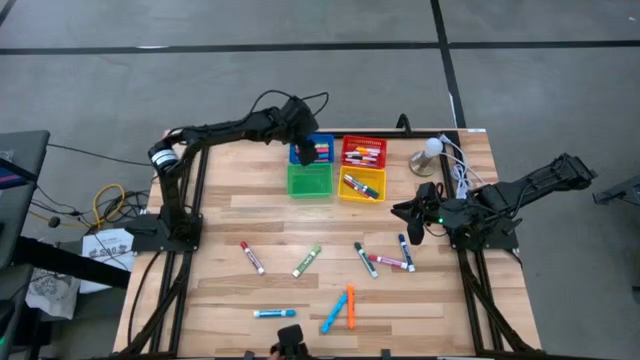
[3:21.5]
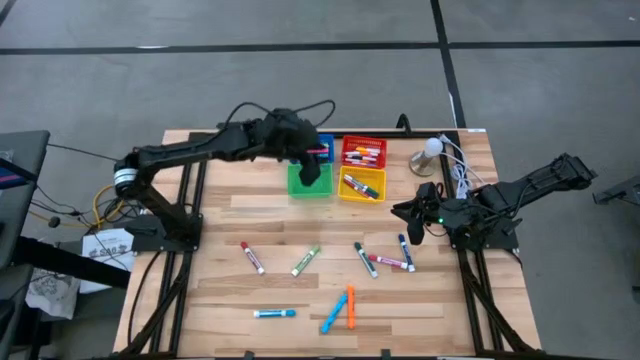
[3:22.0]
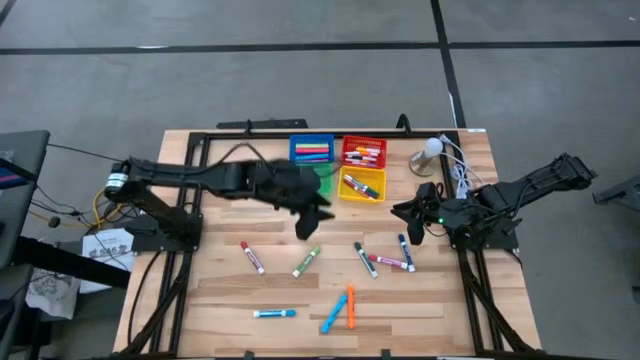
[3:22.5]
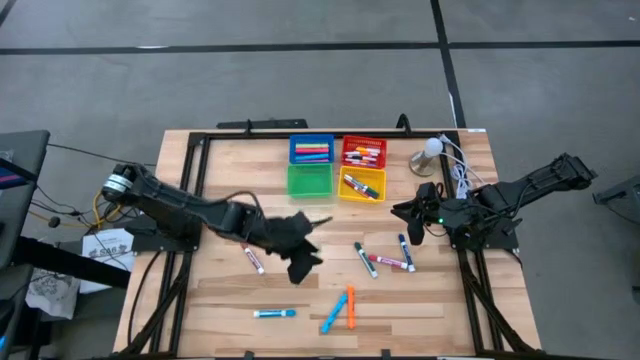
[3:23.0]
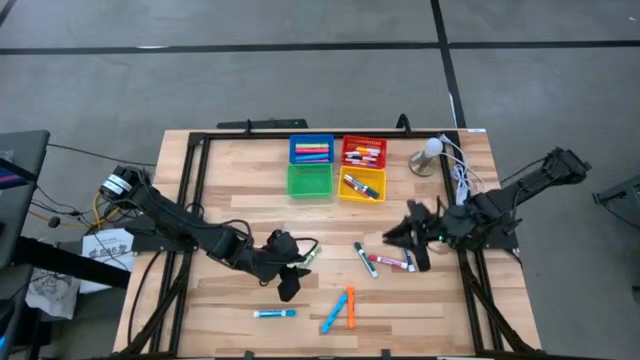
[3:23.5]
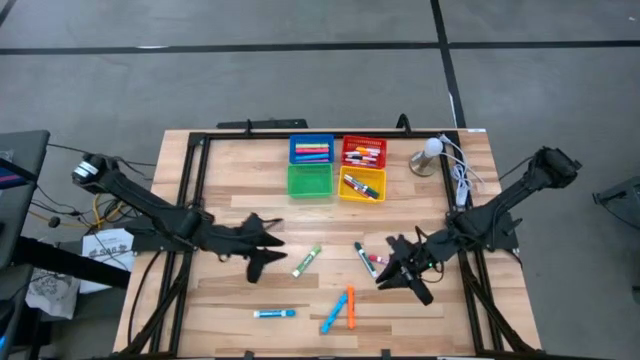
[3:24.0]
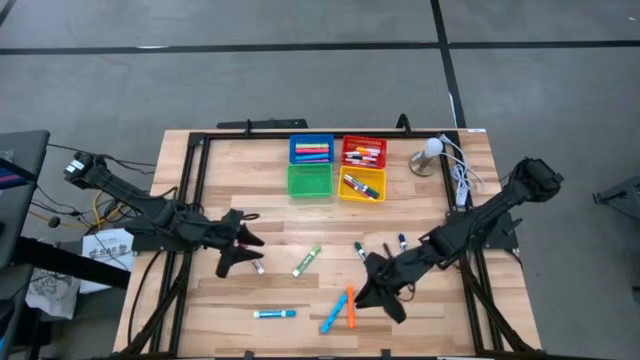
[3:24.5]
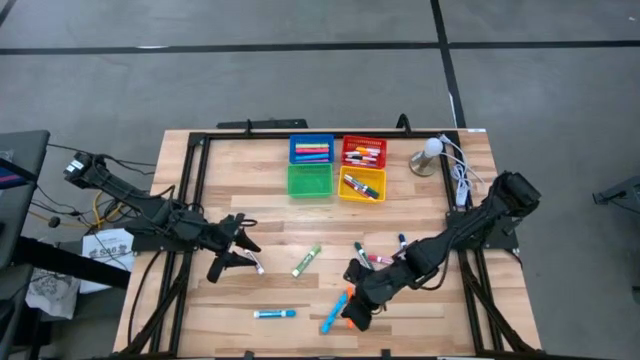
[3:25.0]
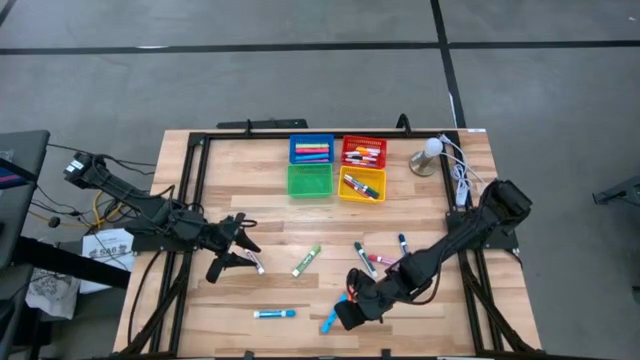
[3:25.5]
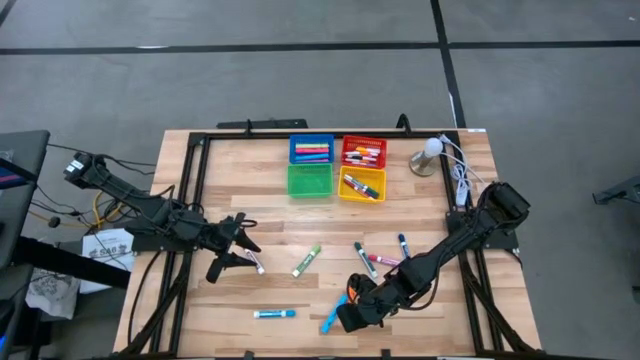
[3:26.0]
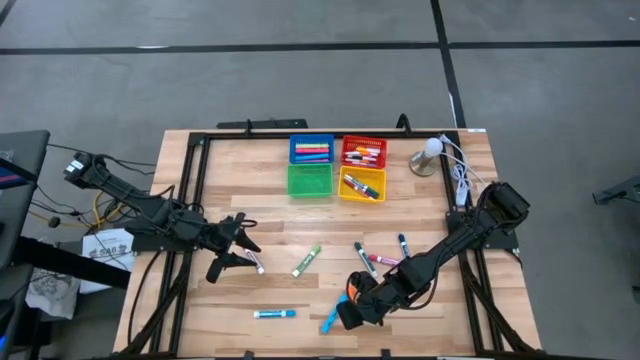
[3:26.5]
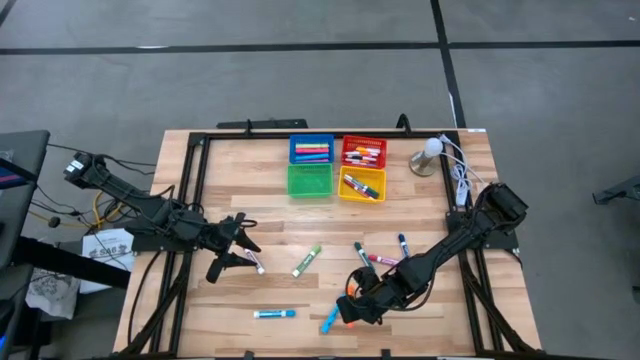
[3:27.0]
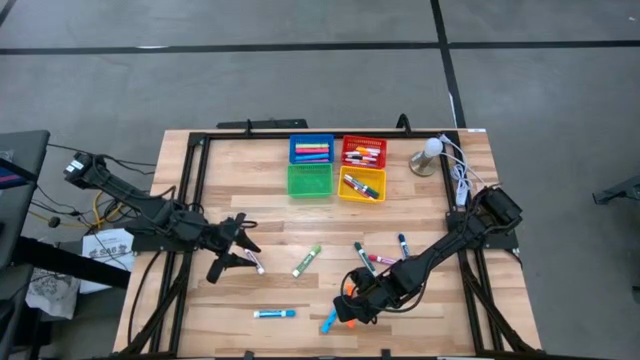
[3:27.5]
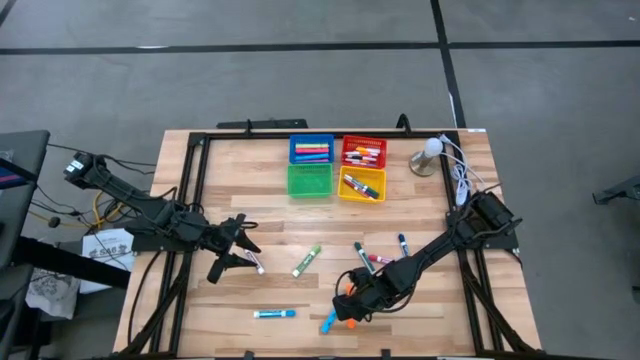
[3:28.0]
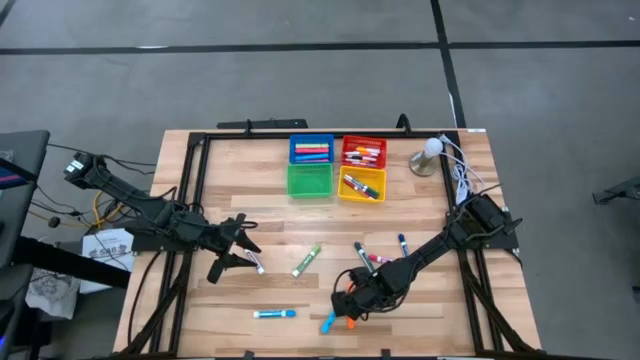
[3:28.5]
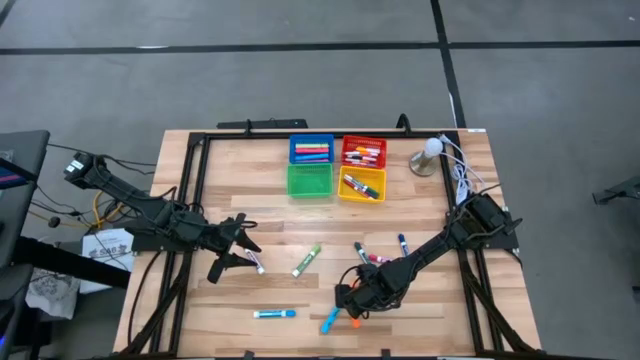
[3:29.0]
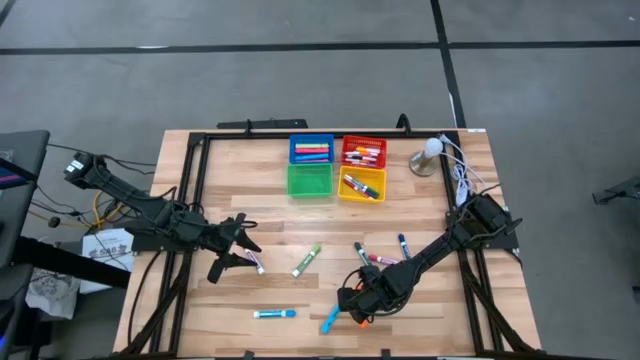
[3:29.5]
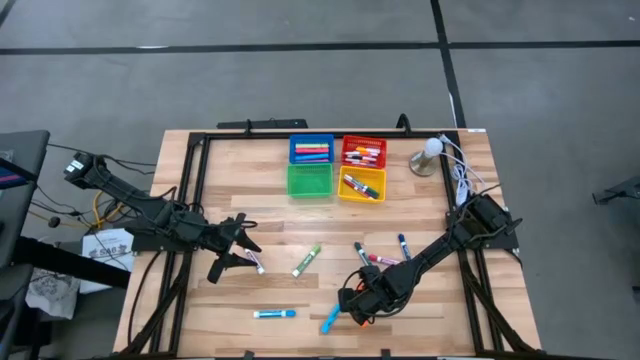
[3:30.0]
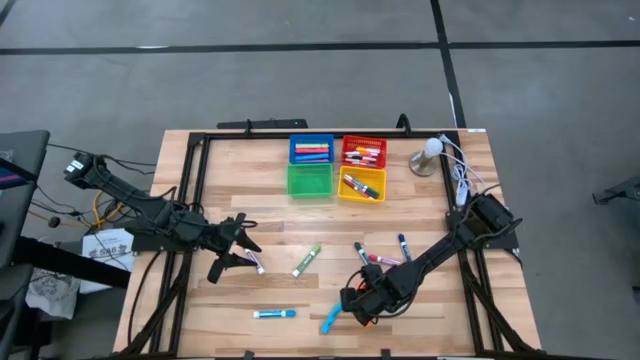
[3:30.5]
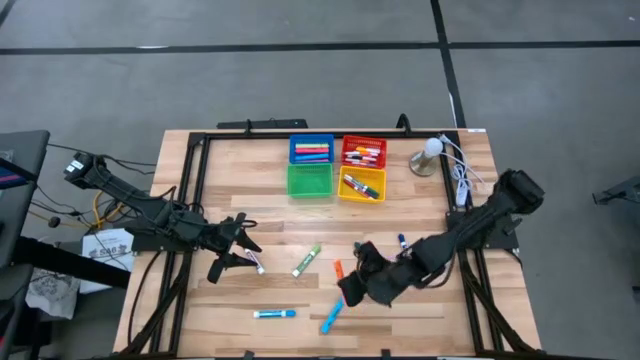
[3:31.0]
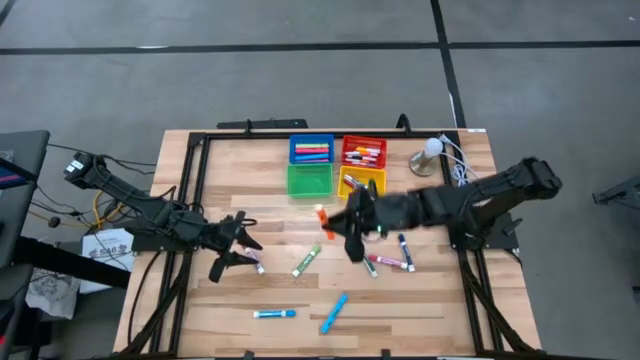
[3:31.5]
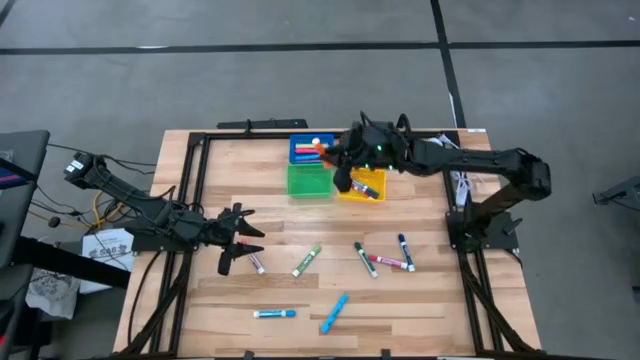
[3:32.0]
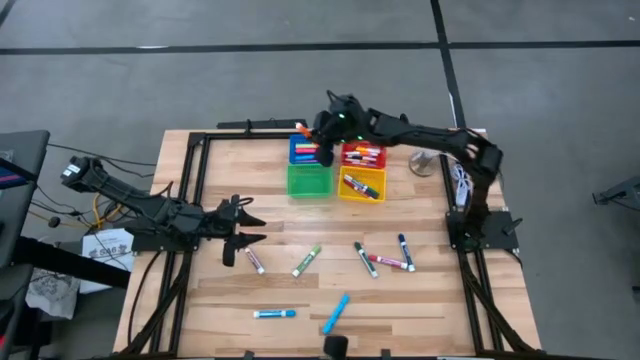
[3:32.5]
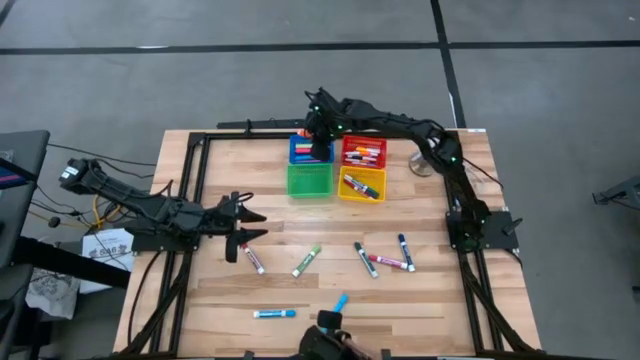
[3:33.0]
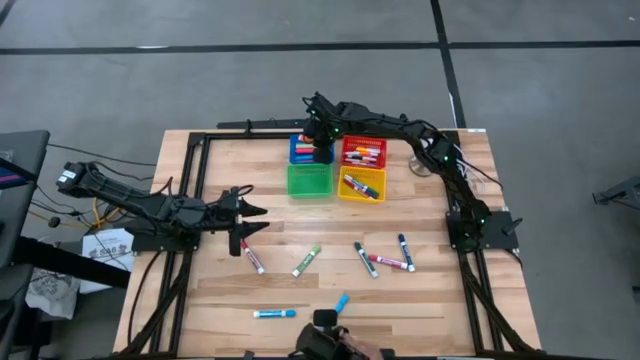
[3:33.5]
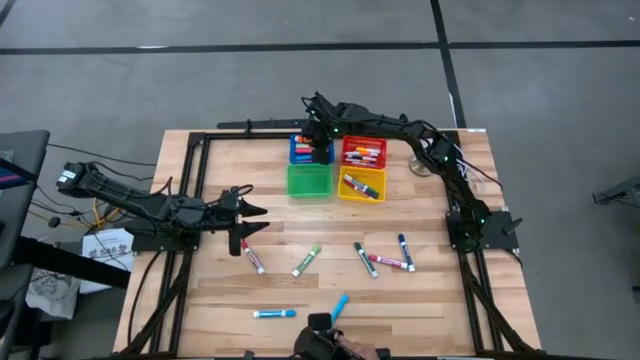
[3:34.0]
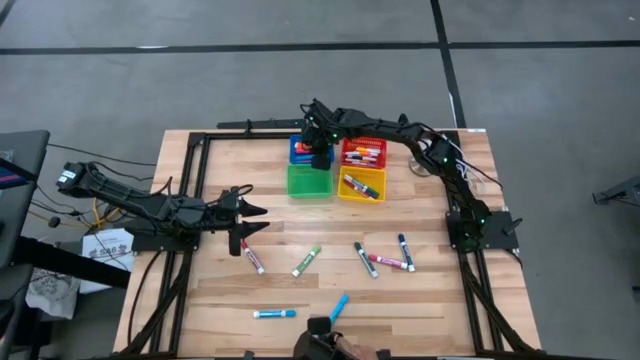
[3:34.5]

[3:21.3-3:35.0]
Task: Pick & Place Markers
Put the orange highlighter into the blue bin

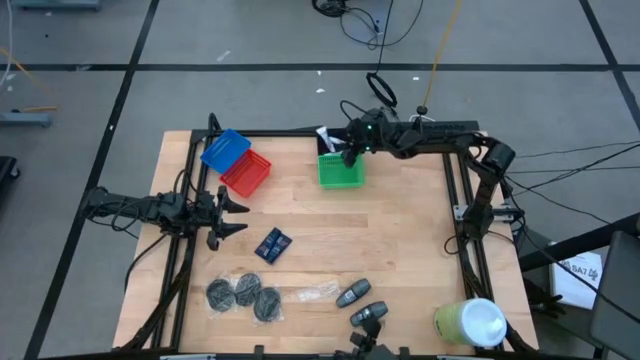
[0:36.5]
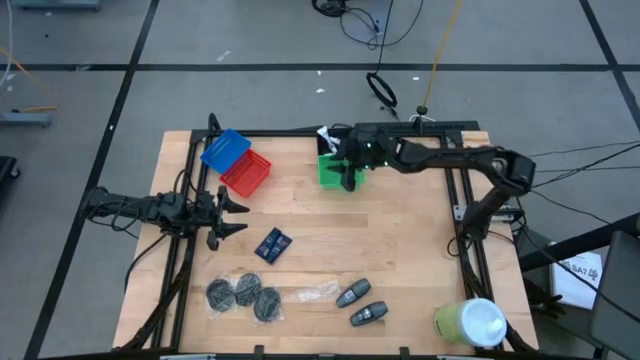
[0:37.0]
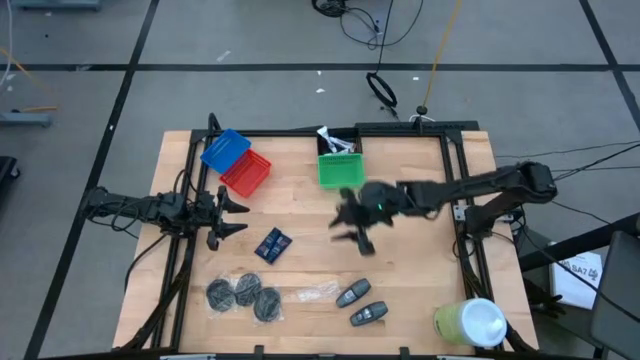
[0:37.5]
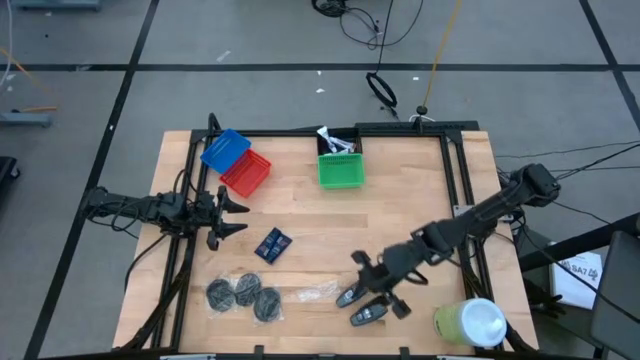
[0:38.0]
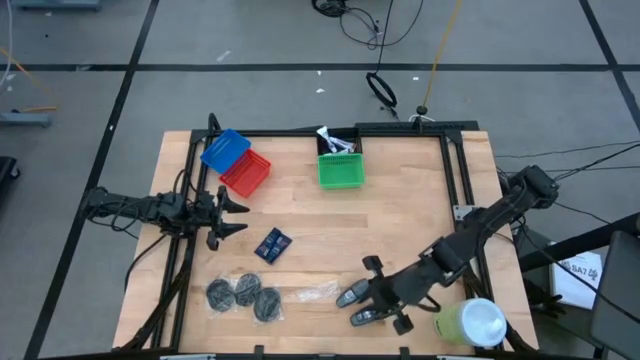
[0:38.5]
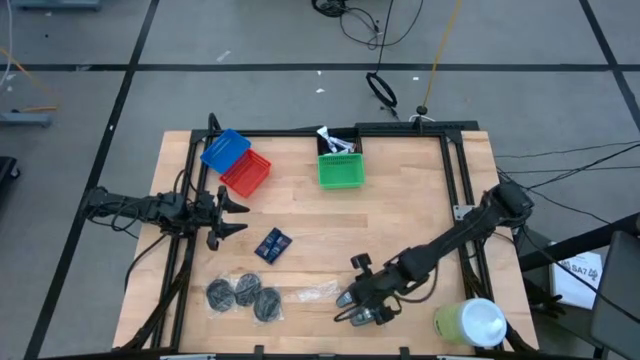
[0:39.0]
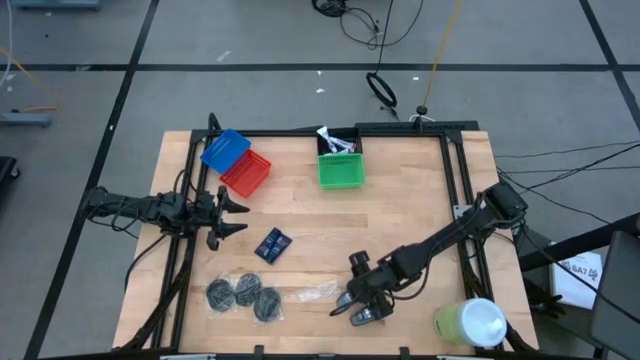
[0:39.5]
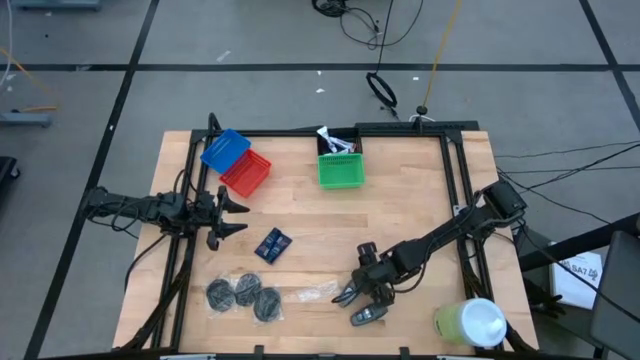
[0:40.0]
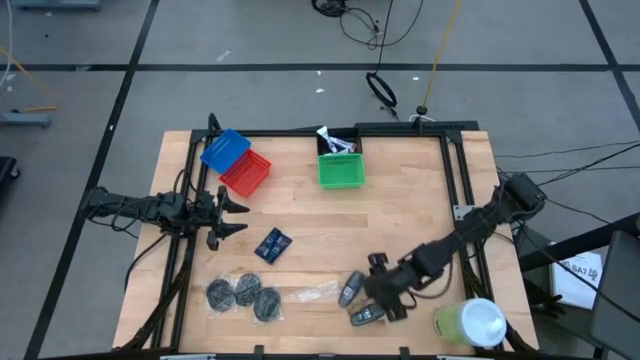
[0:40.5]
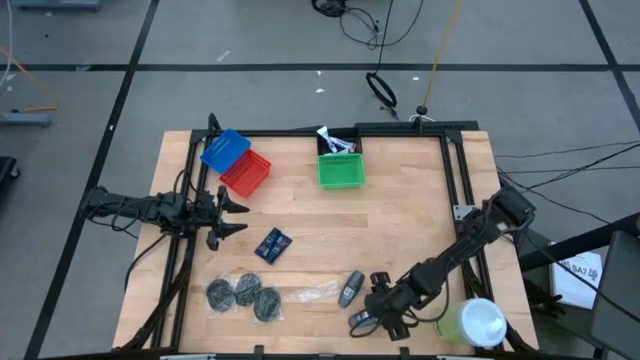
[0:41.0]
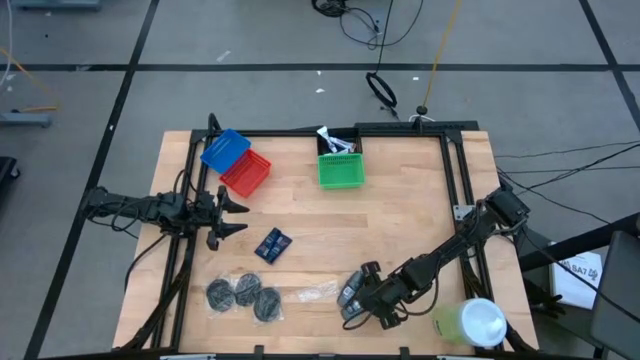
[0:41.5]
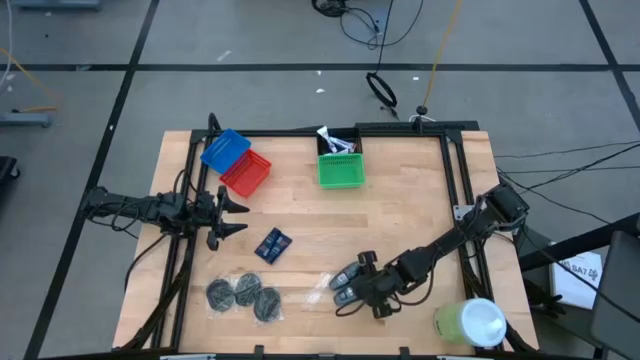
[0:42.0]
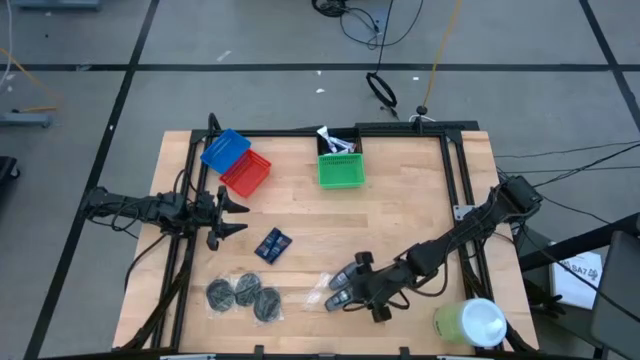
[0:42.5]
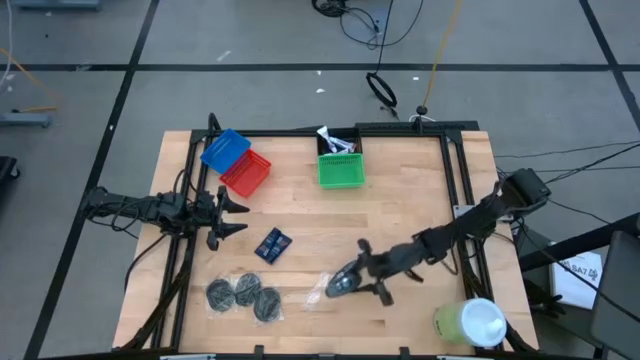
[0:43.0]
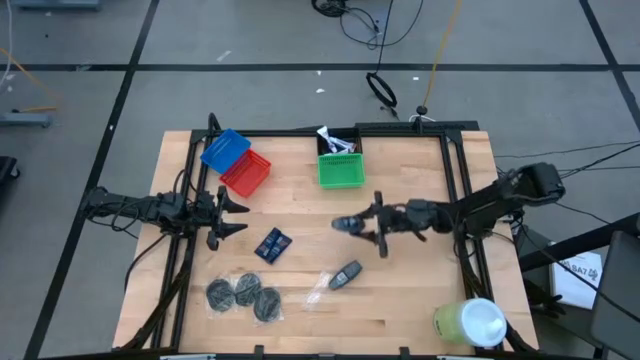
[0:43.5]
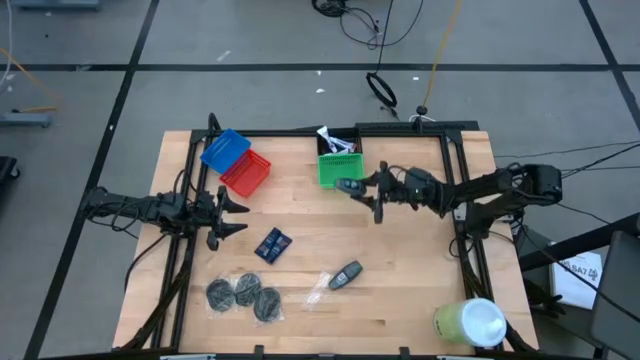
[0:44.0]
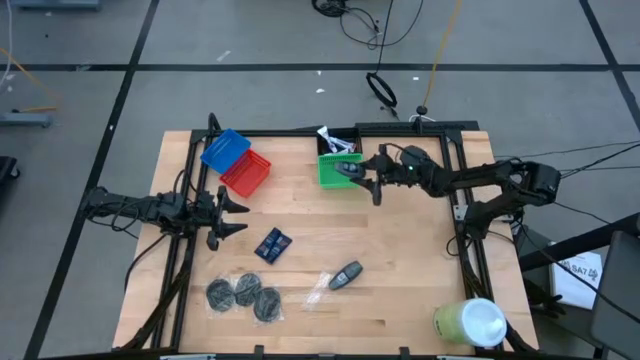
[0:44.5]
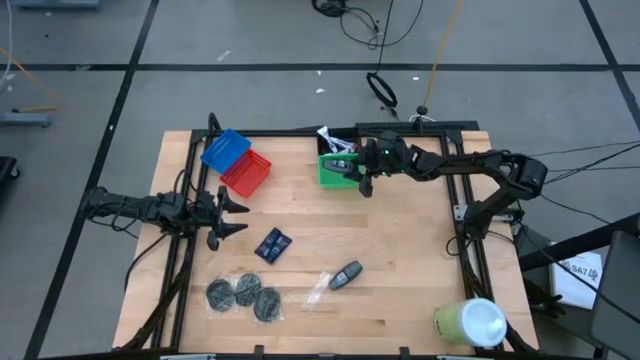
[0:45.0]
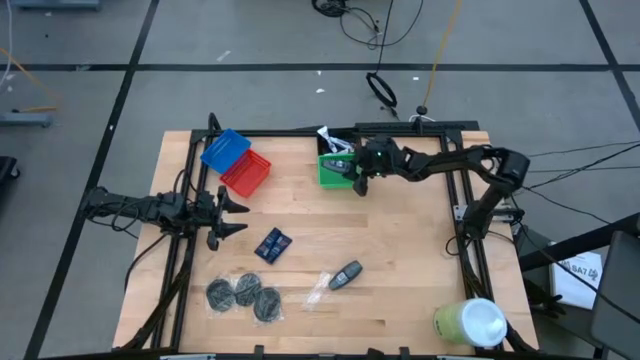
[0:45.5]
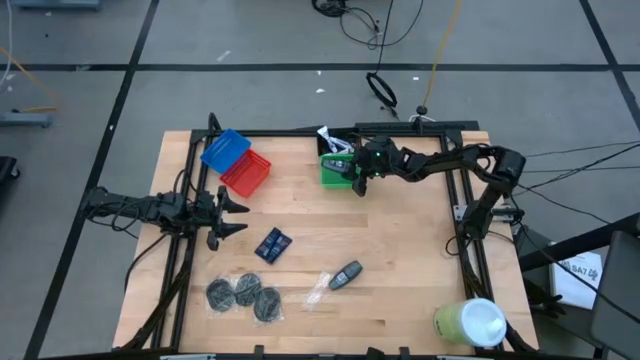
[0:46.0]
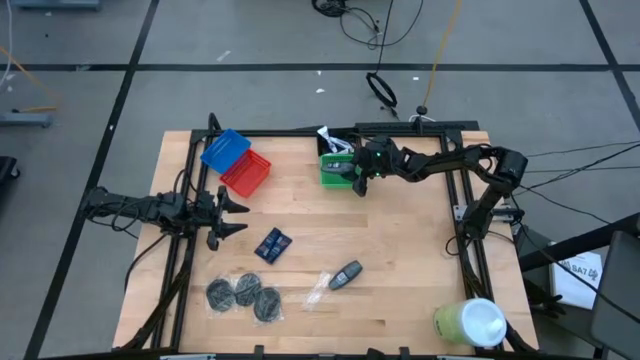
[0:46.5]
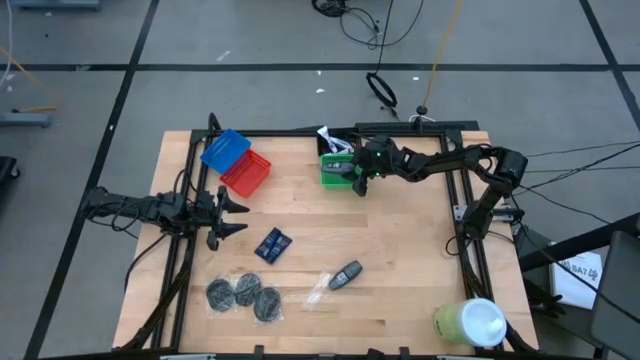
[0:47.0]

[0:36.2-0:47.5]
Task: Pick & Place Travel size toiletries
Put the bottom gray deodorant into the green bin
